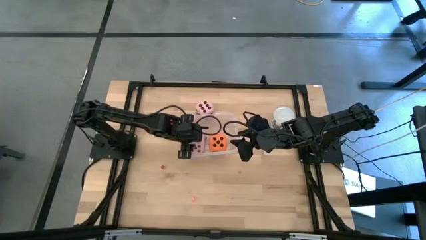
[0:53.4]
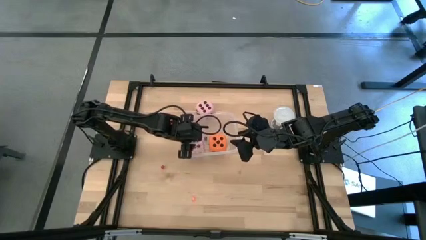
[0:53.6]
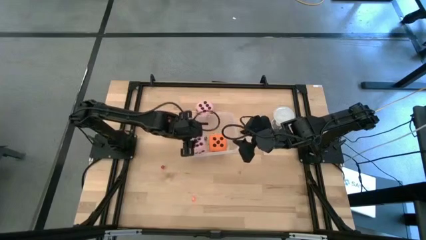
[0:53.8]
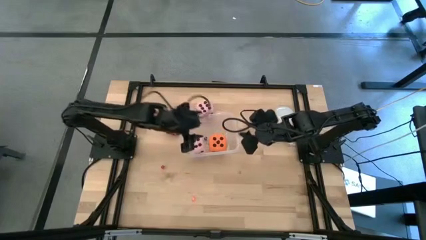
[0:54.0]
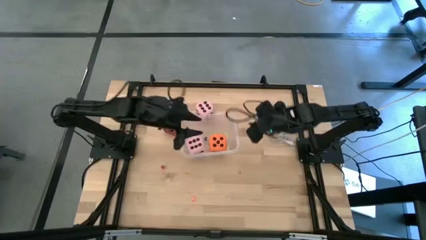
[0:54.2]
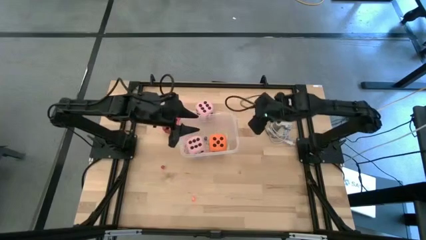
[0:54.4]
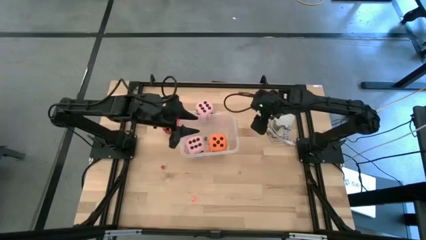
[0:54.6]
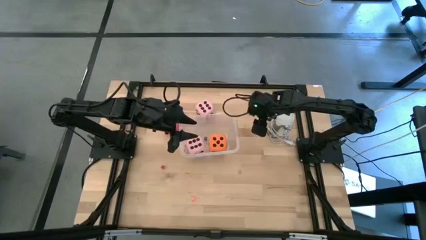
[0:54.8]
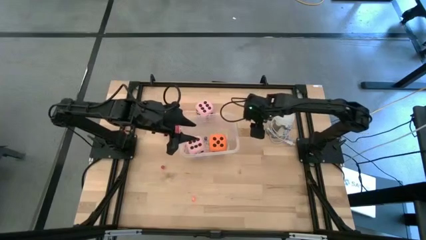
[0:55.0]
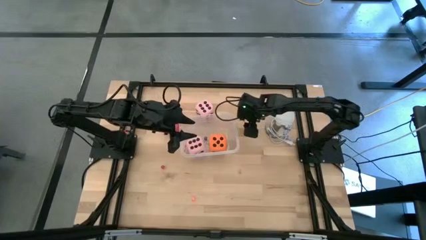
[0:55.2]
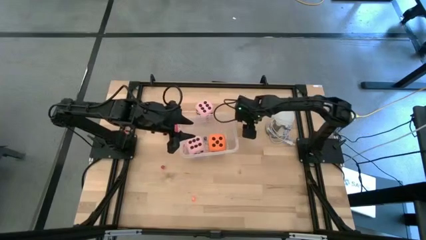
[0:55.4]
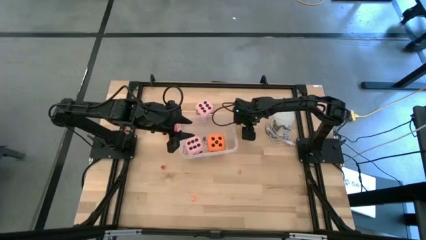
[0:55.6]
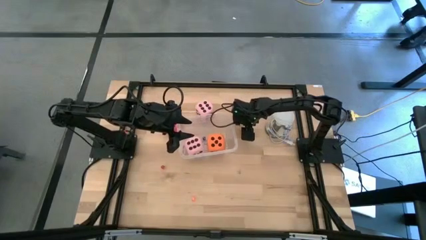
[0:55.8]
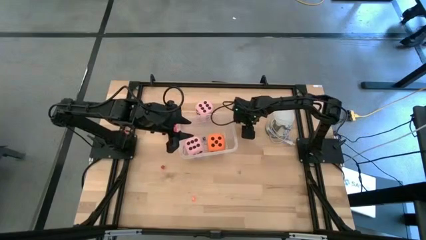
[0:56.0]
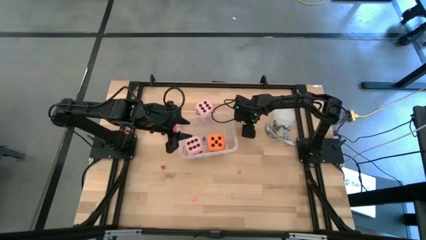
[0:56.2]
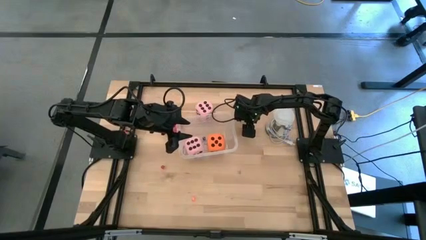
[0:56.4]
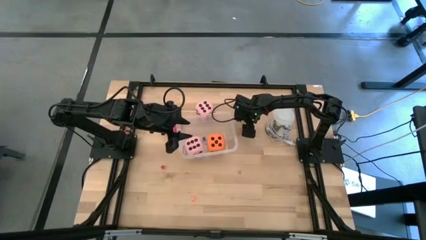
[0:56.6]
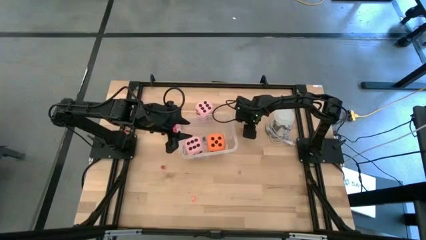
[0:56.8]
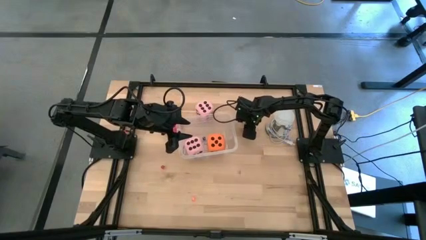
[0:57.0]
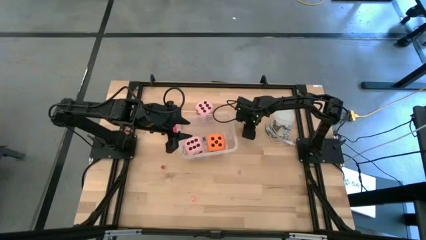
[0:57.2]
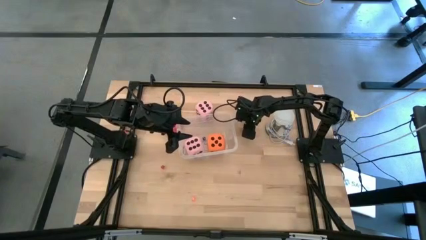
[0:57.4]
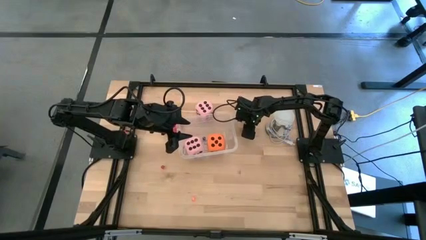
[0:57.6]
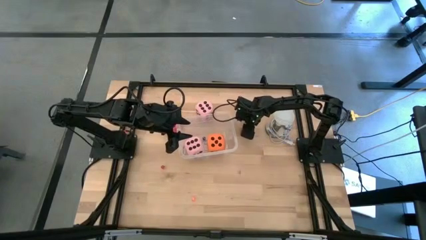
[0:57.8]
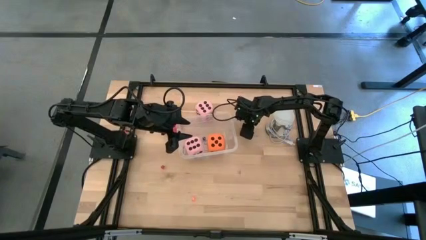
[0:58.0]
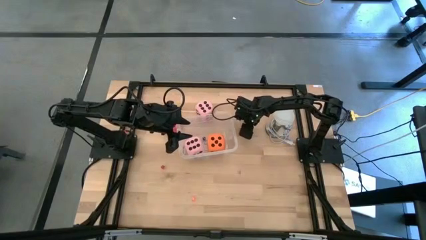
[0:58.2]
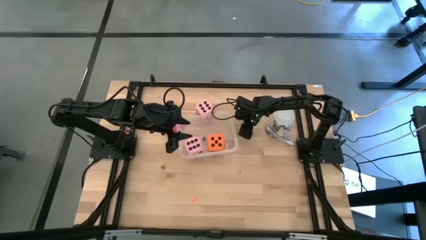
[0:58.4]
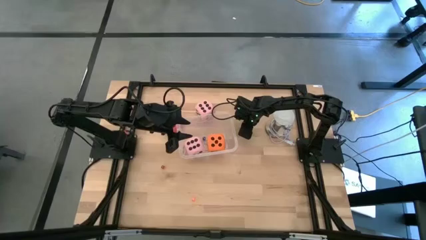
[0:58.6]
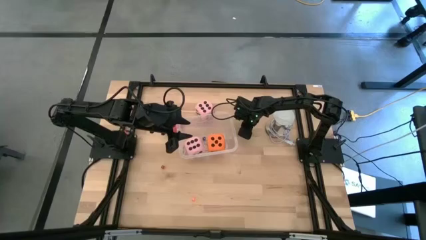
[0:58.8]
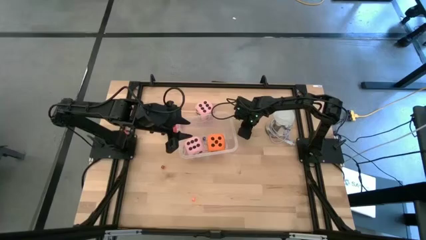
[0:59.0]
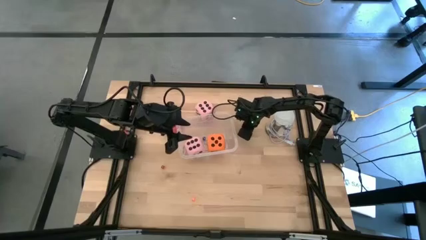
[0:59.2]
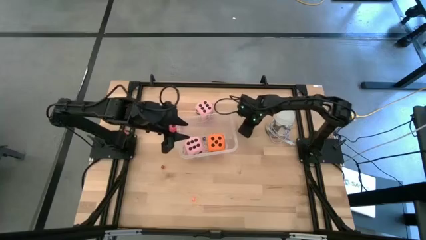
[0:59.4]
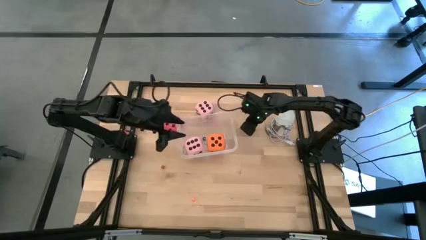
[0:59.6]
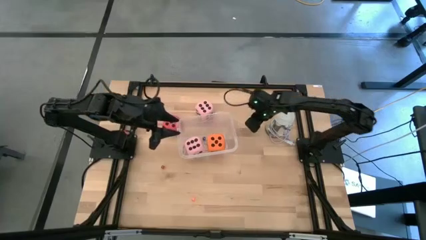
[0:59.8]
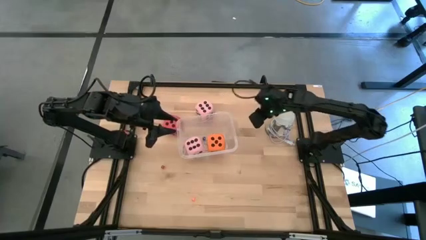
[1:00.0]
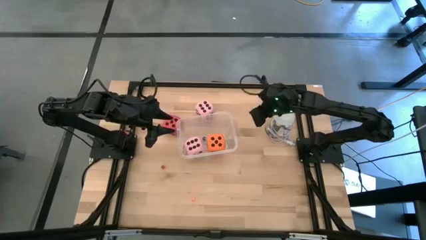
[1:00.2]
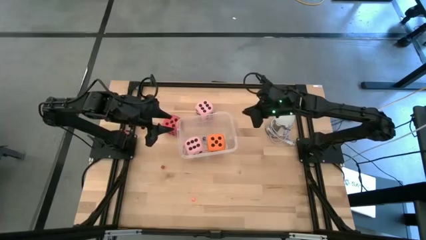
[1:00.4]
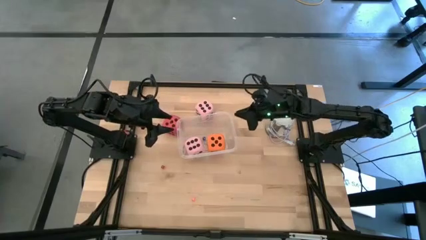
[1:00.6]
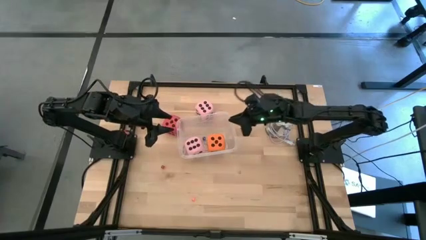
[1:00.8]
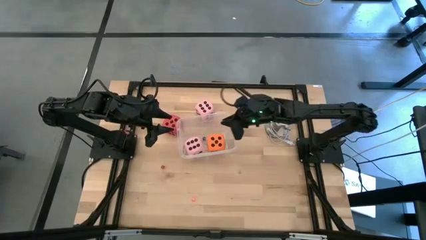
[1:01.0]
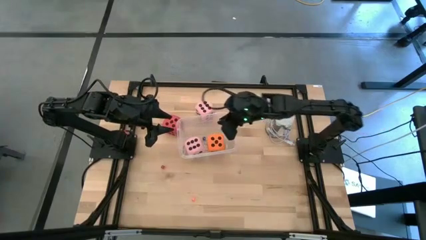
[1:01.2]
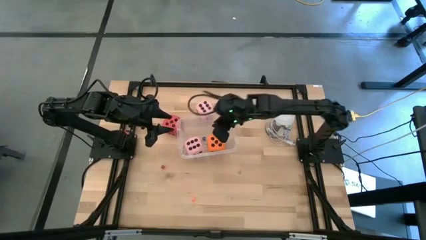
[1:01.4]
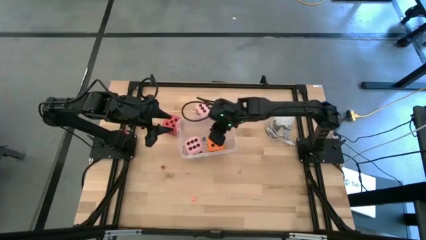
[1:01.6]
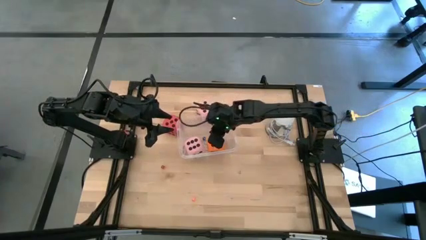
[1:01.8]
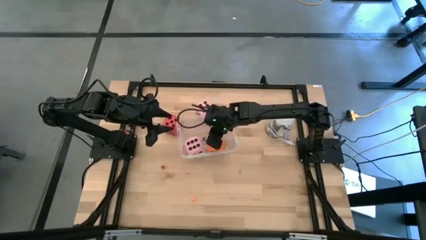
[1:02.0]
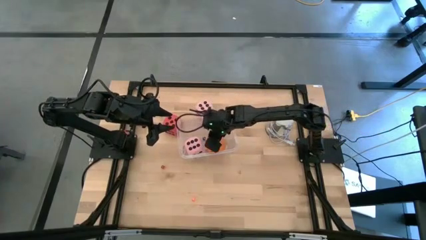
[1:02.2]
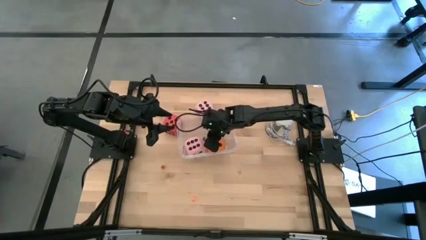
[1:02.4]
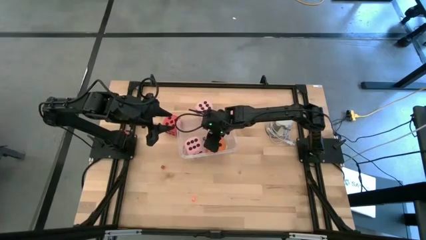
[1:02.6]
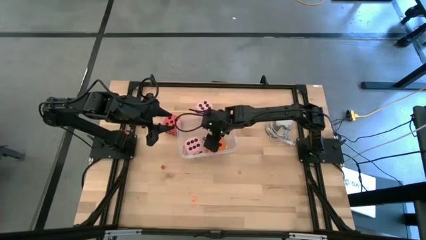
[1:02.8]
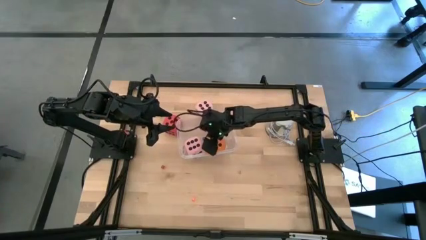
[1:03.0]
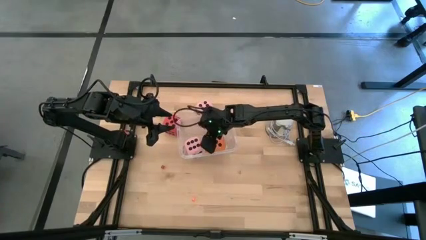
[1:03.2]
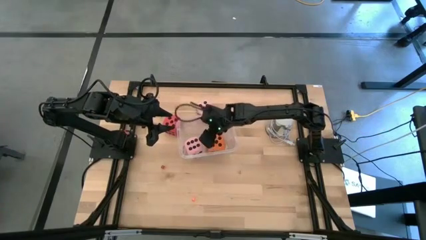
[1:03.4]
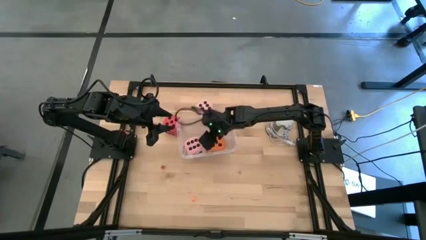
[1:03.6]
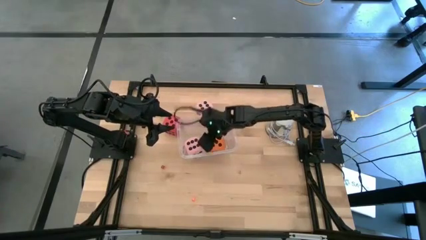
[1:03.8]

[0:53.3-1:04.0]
Task: Pick & Place Dice
Put the small yellow dice into the transparent bin

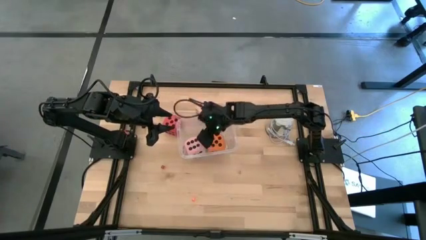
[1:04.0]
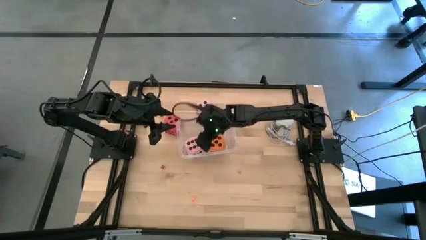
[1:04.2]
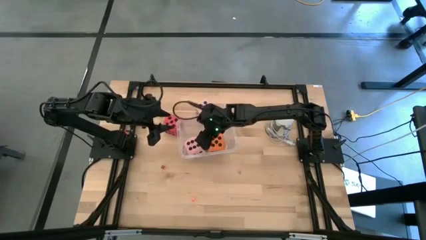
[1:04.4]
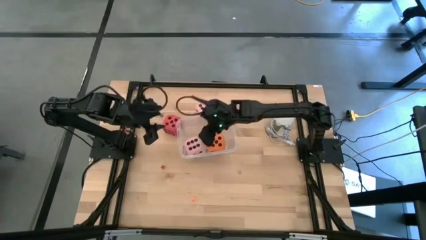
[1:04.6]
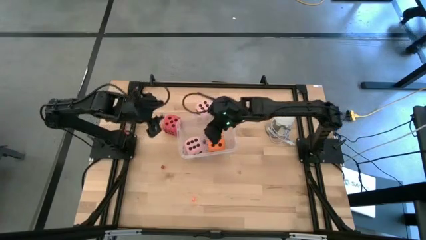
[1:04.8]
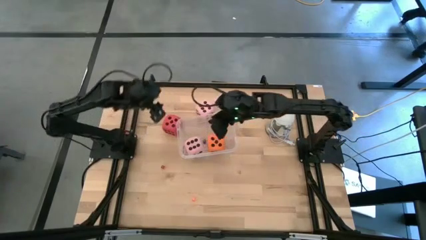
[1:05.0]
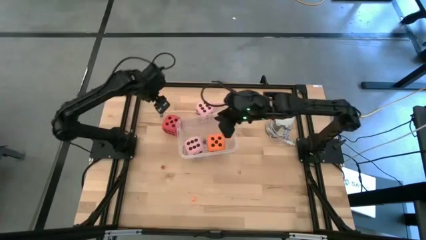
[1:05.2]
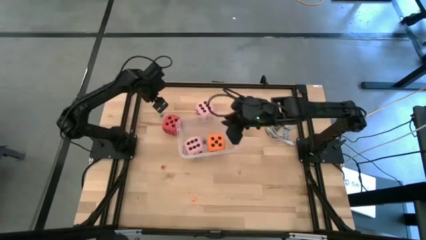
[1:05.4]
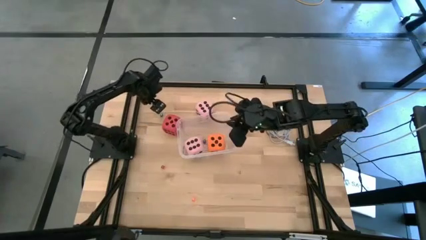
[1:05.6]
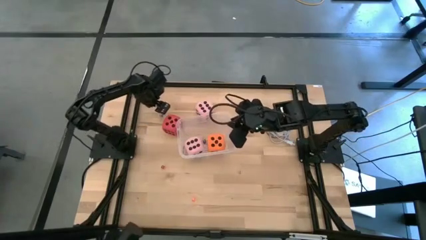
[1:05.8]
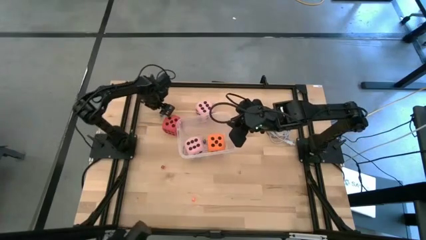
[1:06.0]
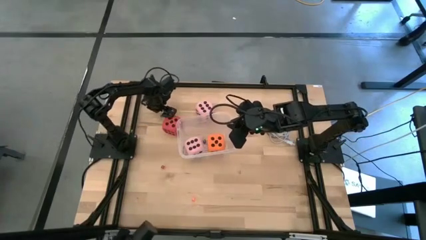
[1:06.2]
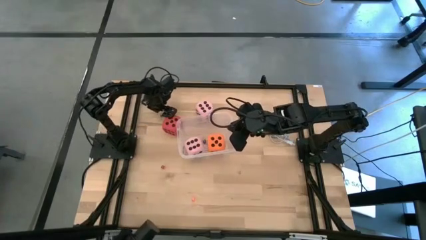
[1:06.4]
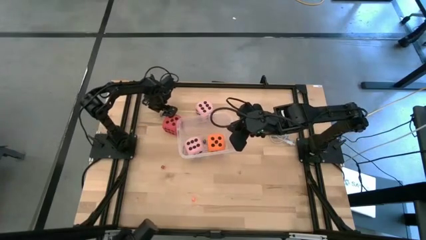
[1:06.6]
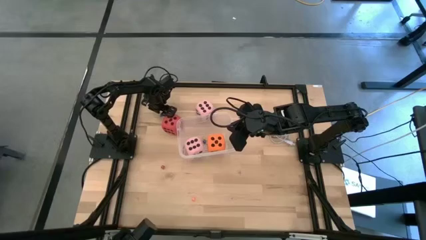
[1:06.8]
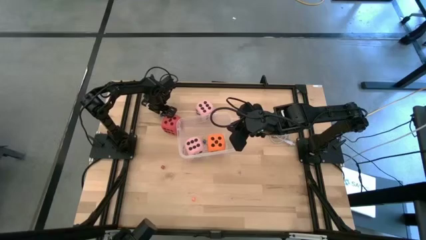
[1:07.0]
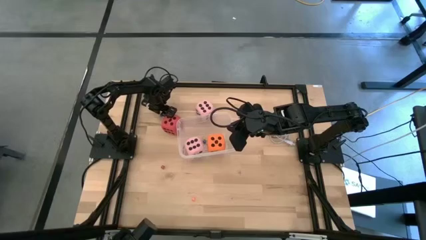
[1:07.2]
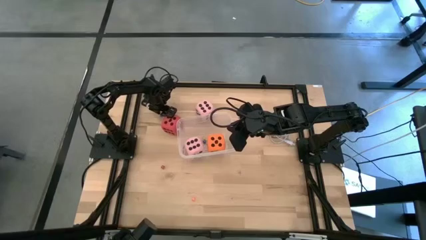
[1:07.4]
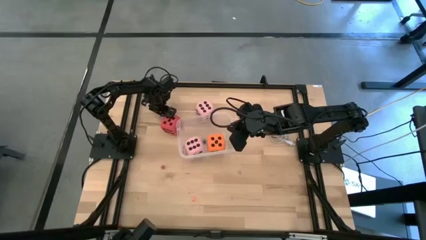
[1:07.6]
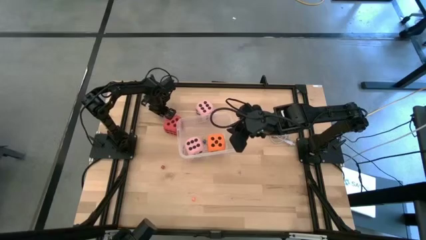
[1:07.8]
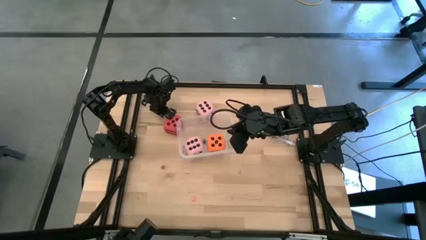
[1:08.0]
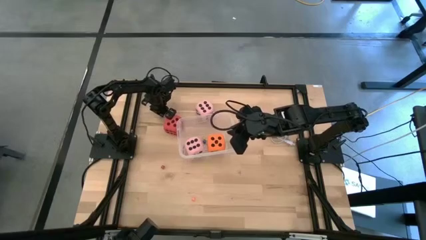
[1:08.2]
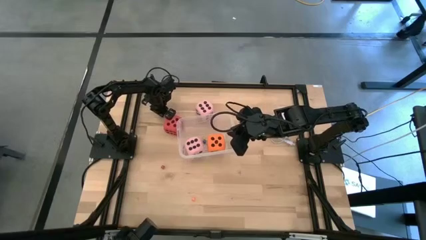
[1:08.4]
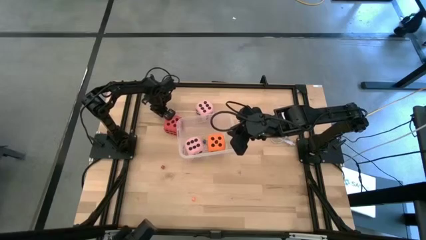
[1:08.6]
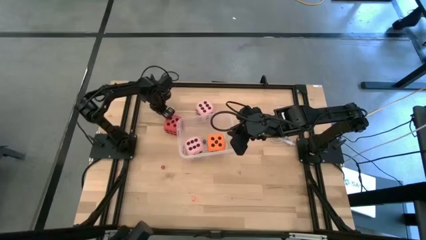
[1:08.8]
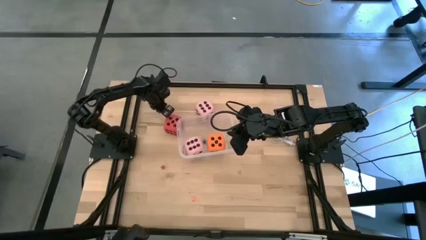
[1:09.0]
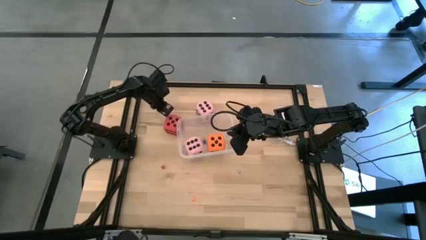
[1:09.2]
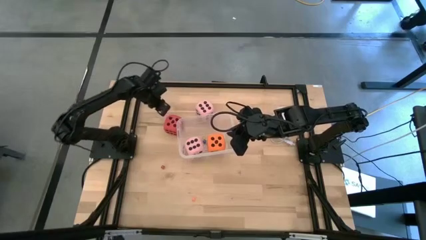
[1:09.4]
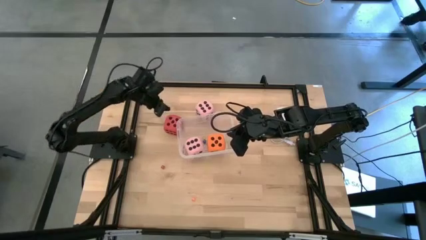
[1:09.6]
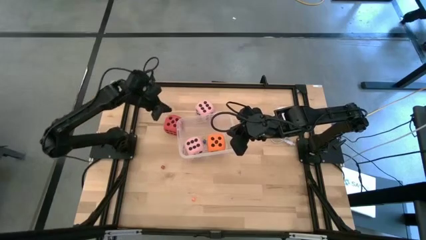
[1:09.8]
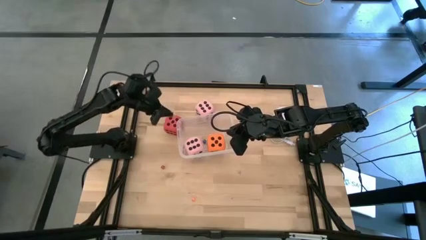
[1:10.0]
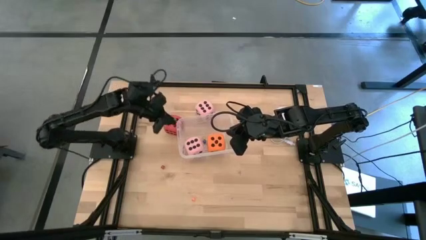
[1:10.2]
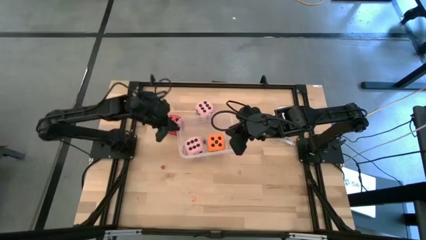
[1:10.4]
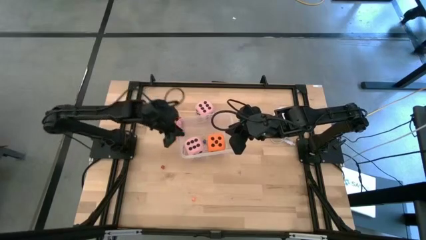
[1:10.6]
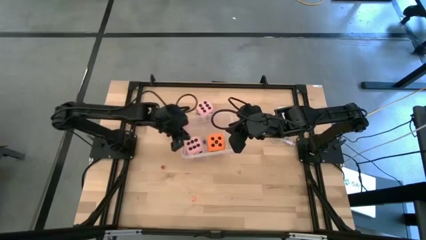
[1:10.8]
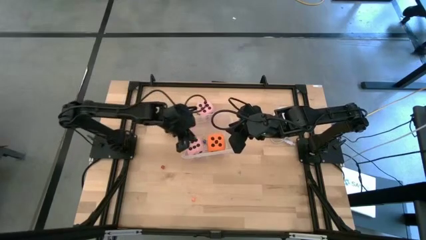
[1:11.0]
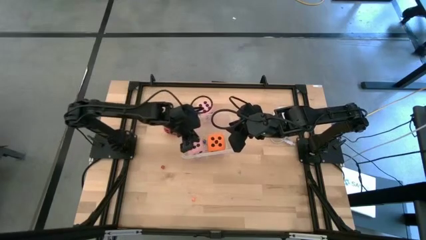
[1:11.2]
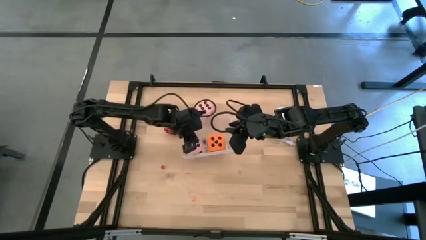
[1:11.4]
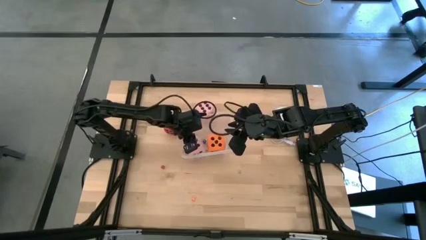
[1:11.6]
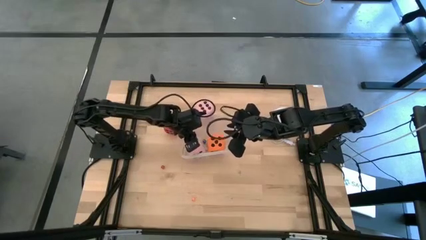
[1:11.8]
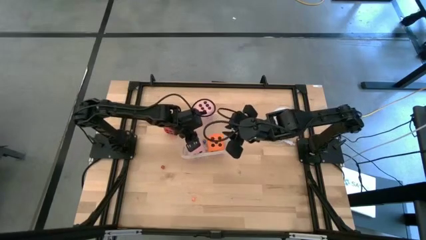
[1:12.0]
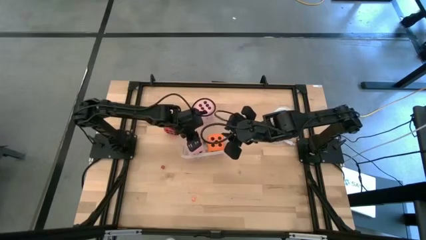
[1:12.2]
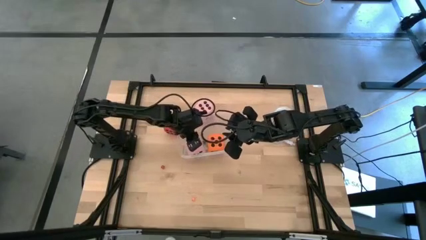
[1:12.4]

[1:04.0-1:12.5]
Put the small blue dice into the transparent bin
